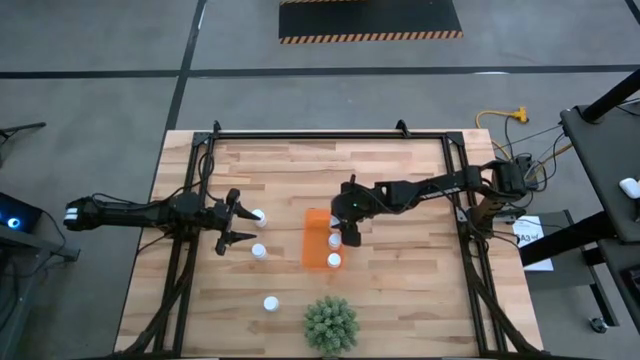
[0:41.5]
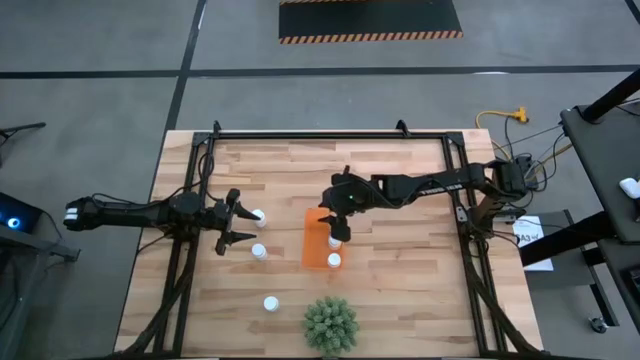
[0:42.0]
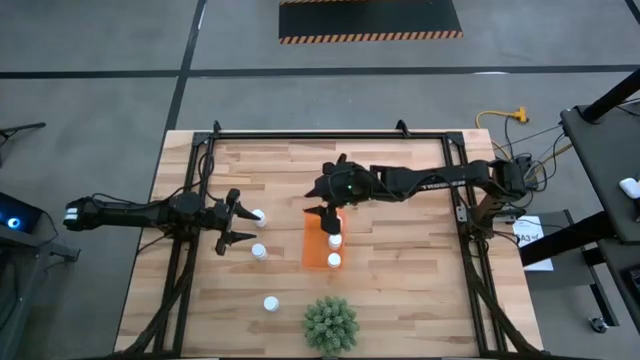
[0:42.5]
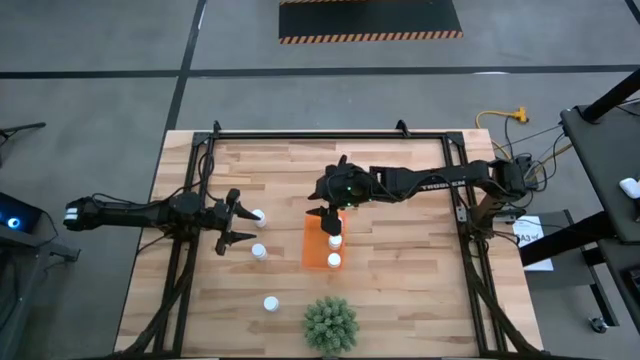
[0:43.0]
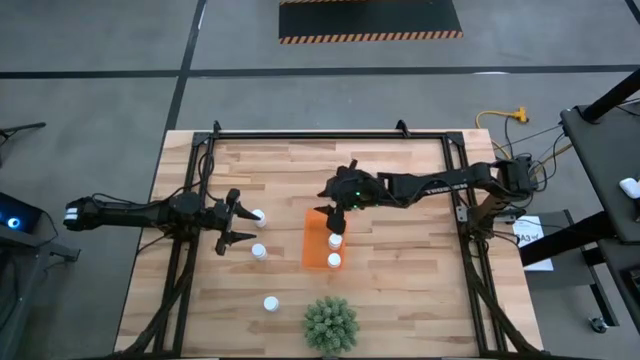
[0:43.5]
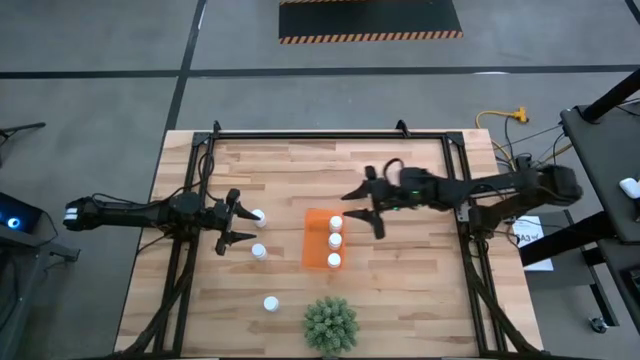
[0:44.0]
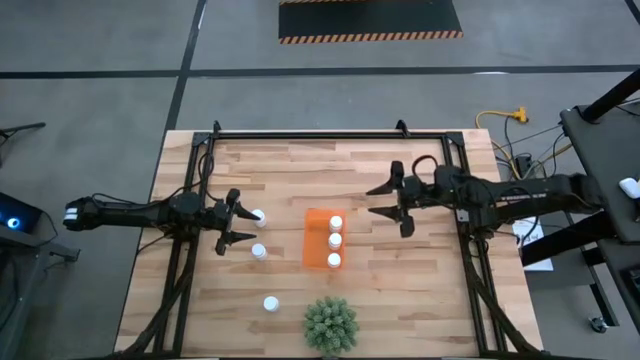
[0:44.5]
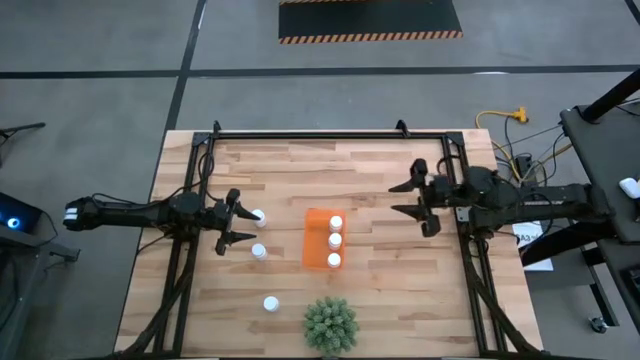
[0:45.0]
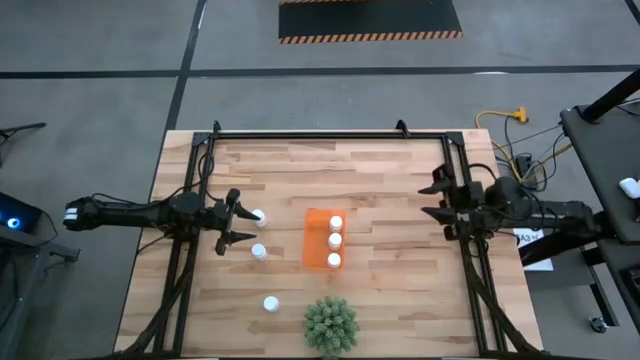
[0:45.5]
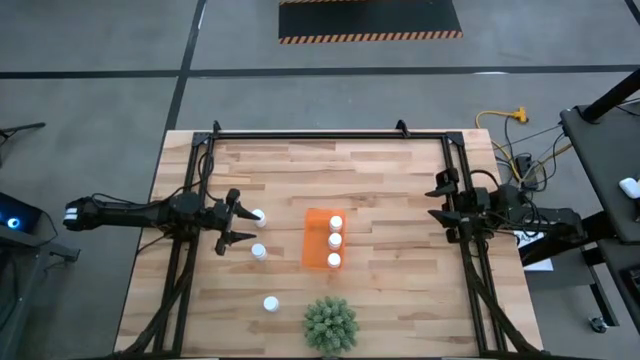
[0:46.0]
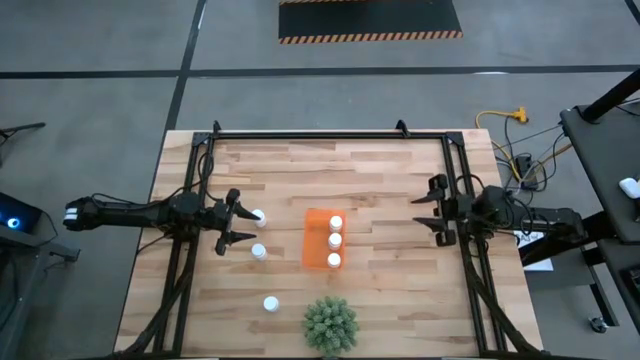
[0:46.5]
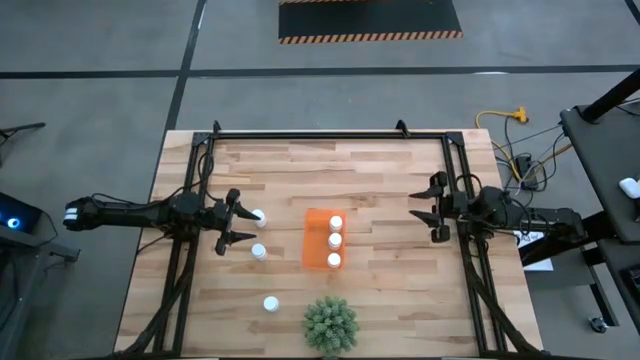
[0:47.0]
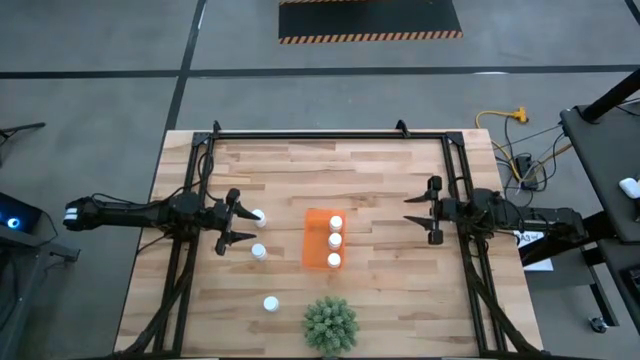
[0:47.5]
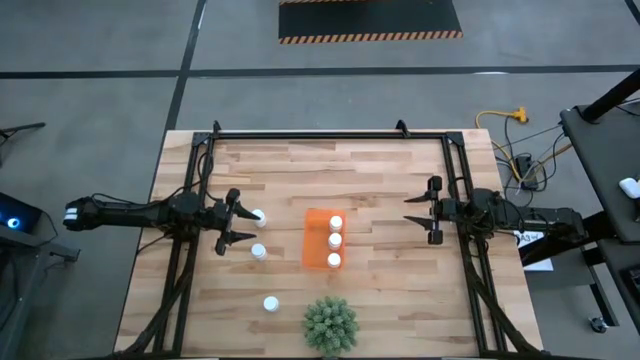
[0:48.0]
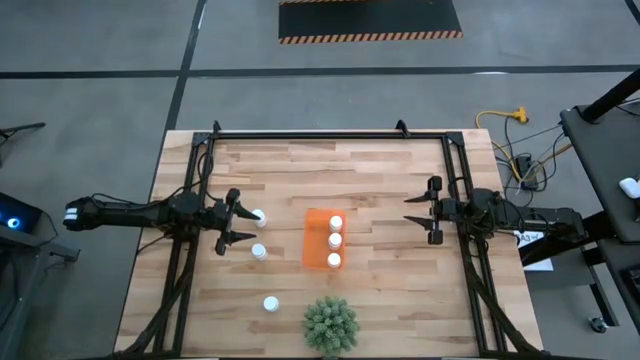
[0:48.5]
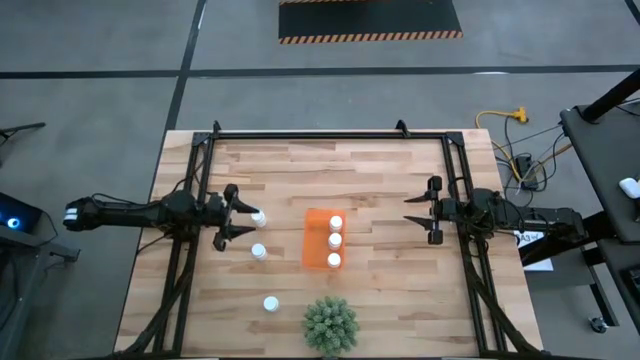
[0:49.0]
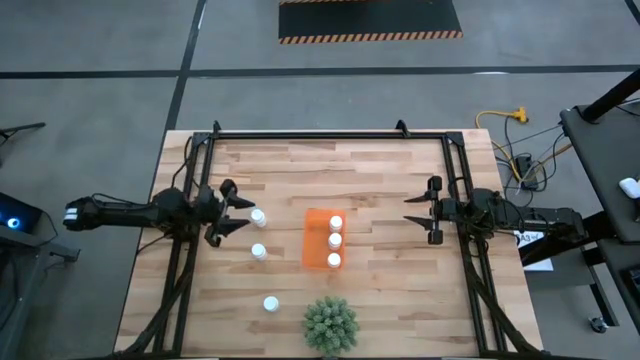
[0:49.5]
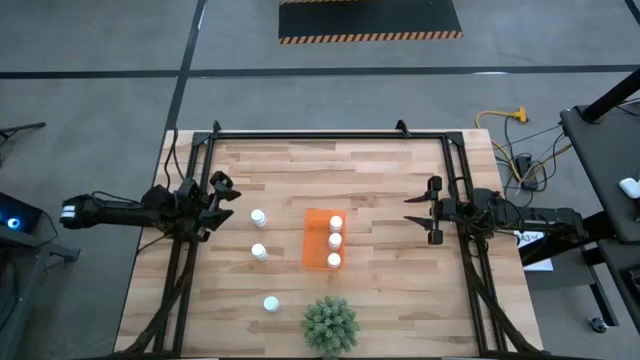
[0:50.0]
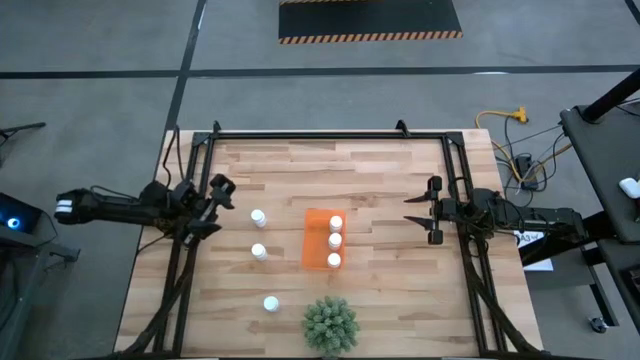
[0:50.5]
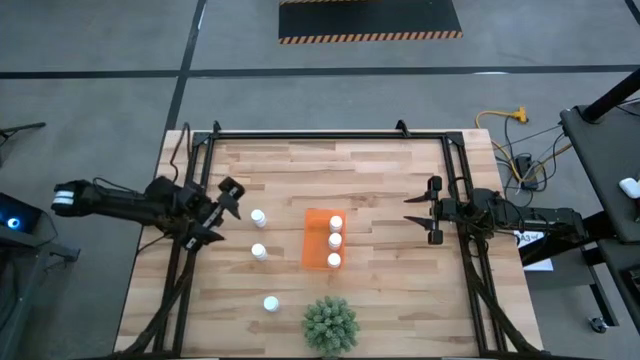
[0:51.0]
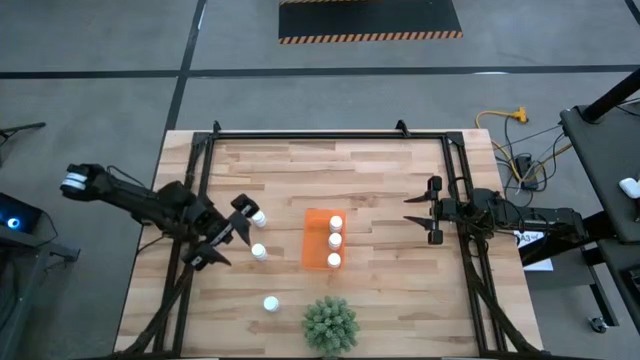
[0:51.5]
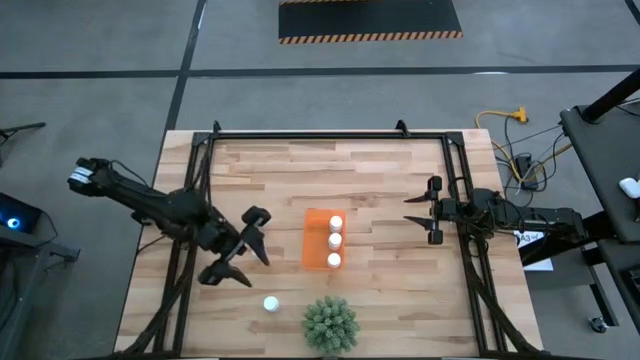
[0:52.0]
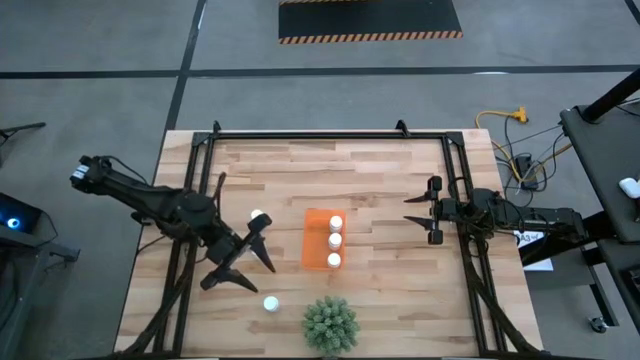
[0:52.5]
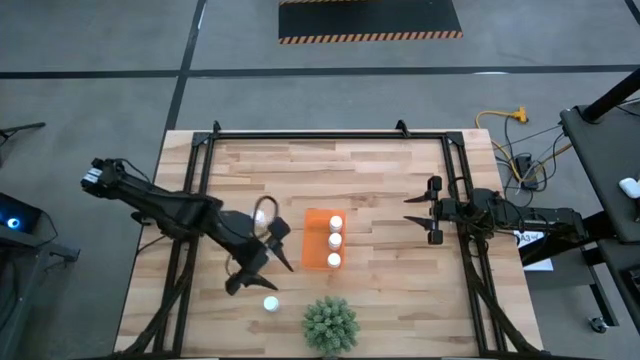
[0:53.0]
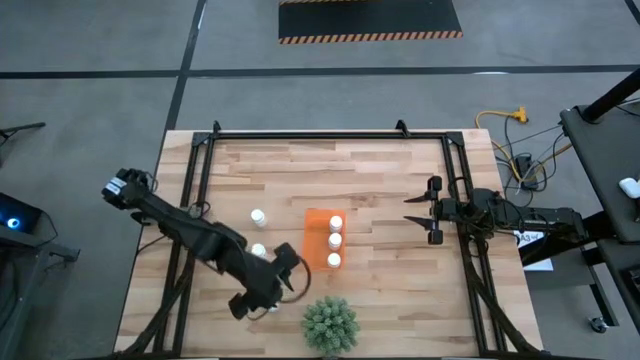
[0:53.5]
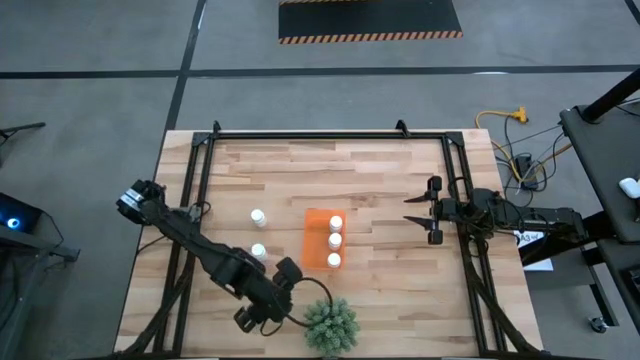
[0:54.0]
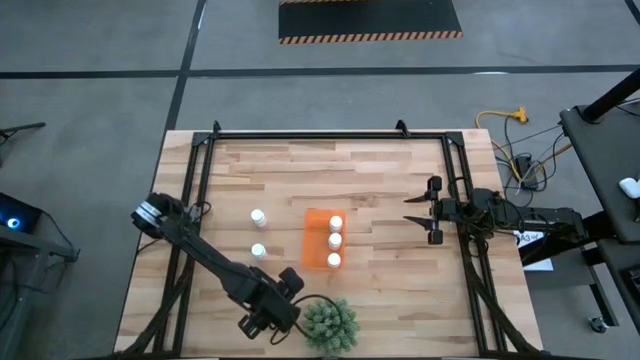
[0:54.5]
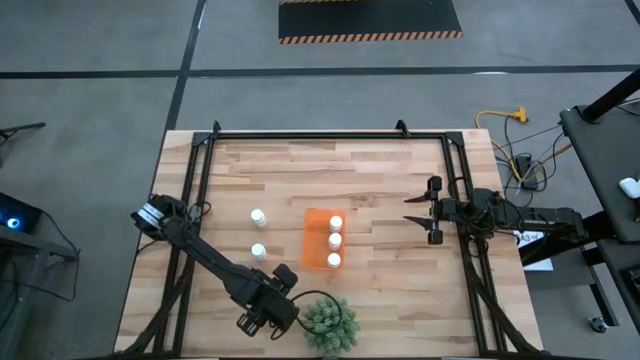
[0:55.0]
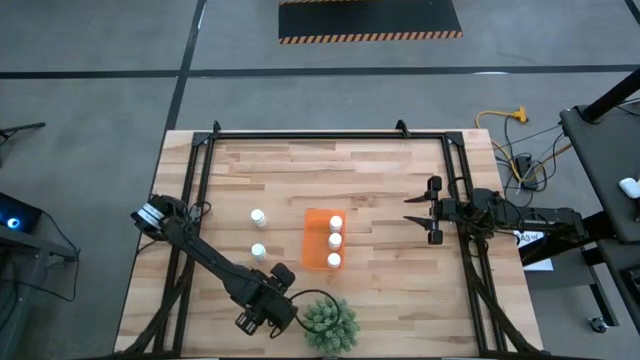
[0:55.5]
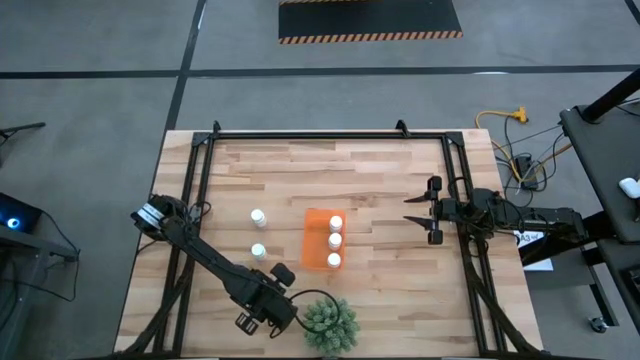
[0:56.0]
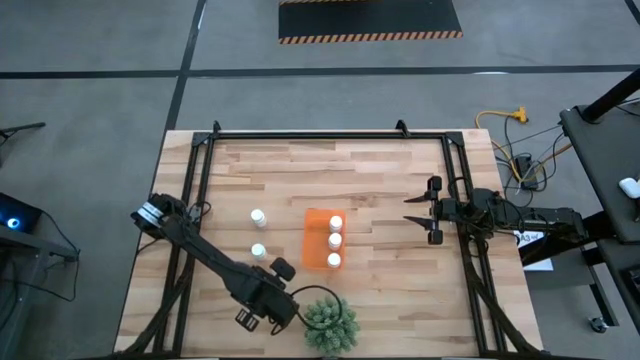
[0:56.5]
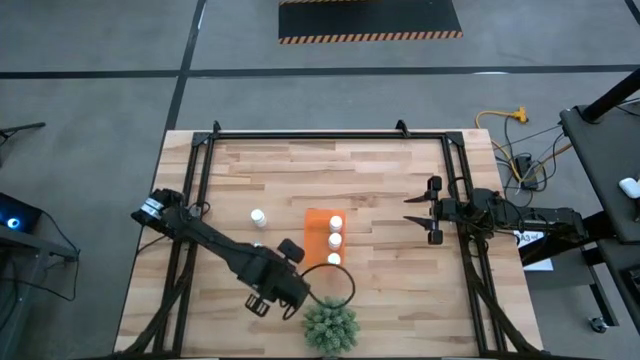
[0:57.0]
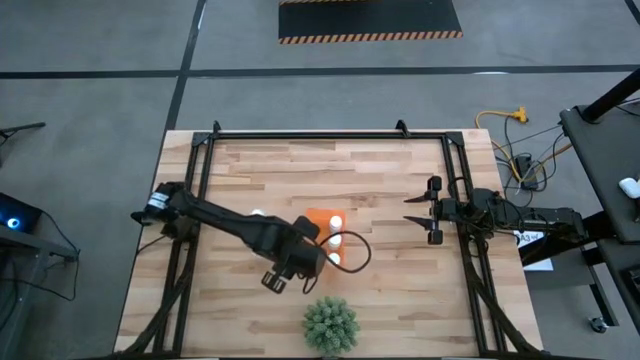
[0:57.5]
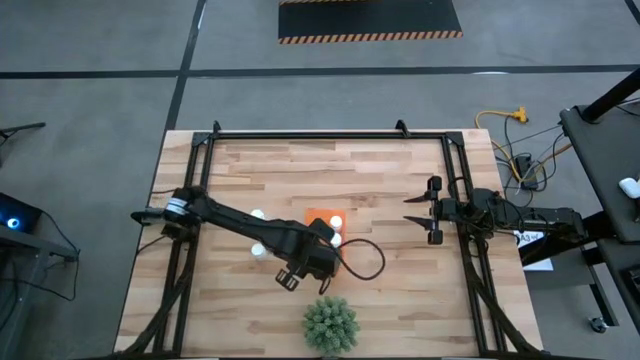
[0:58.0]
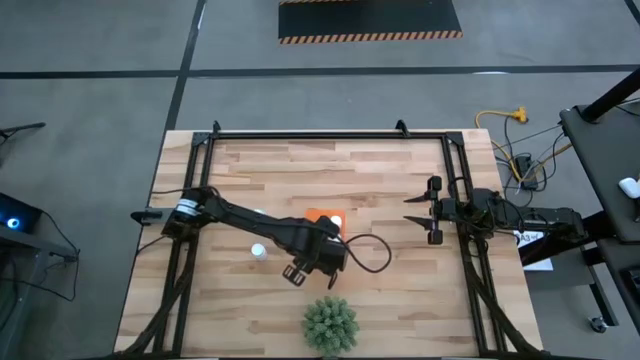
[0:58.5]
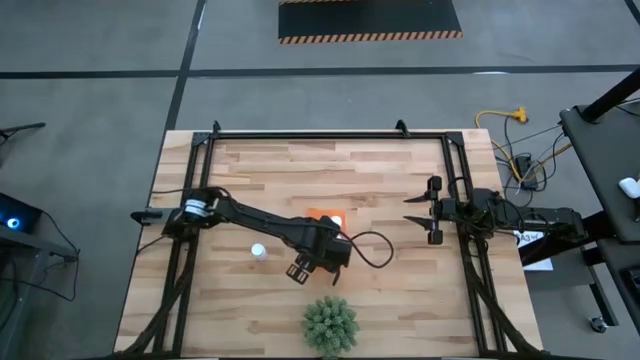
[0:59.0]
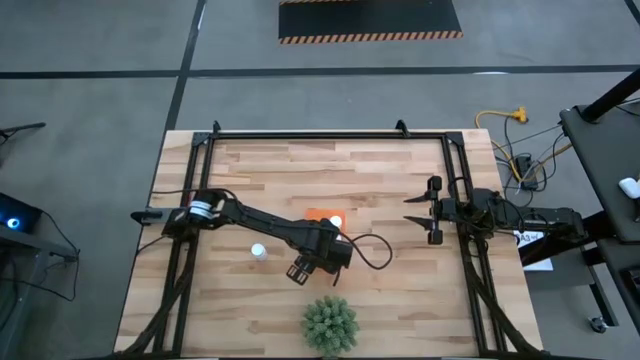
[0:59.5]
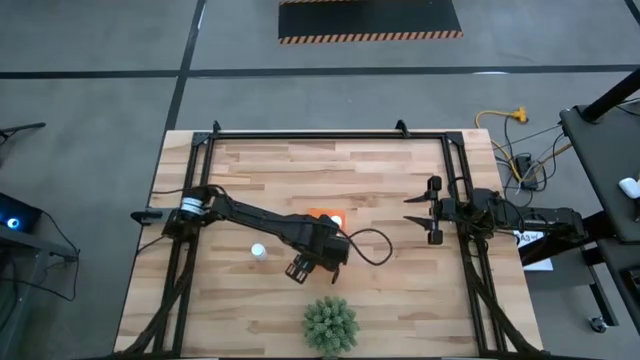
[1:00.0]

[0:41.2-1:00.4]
Task: Pick and place pill bottles into a basket
Put the white pill bottle into the orange bin

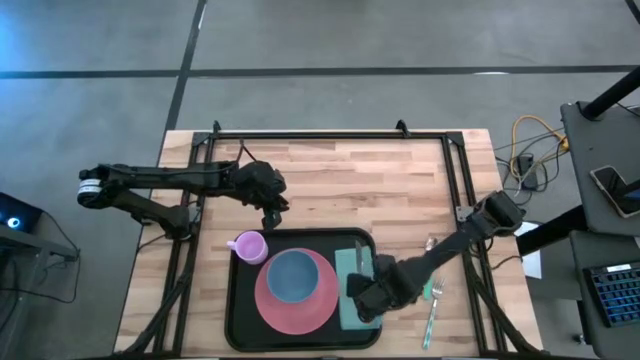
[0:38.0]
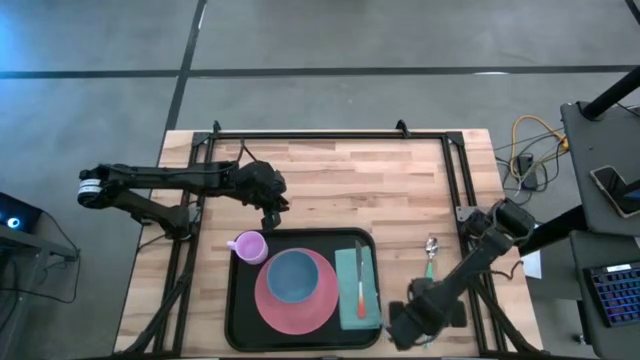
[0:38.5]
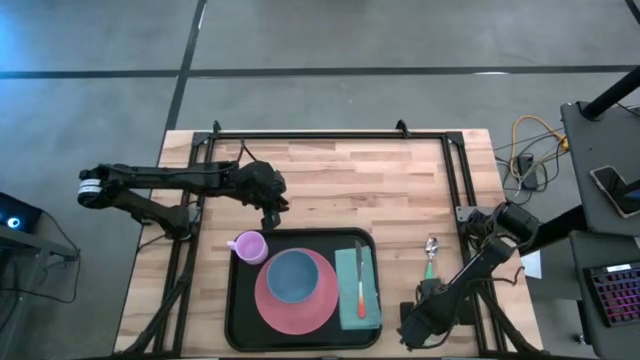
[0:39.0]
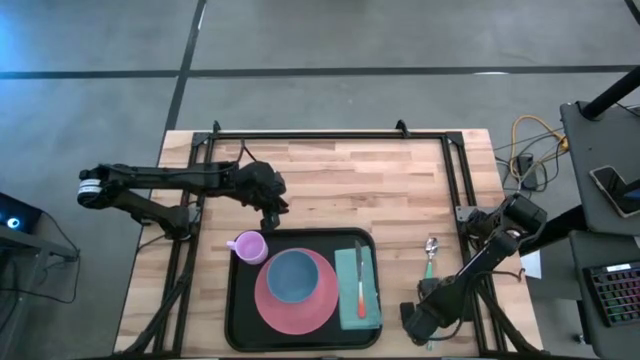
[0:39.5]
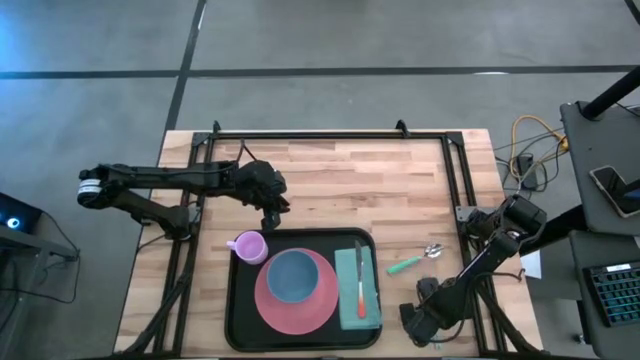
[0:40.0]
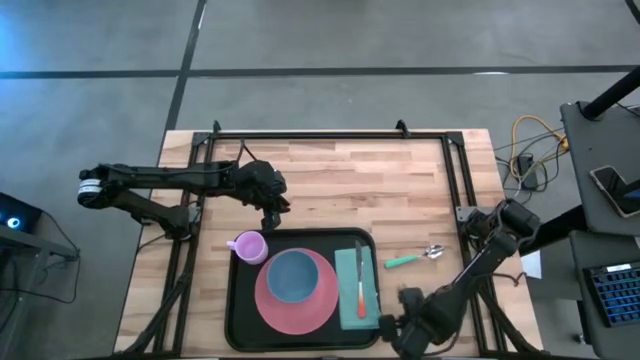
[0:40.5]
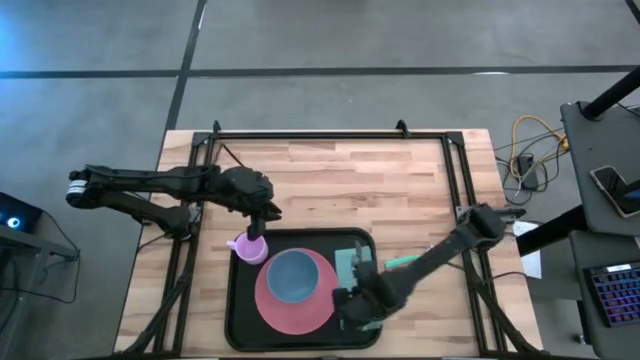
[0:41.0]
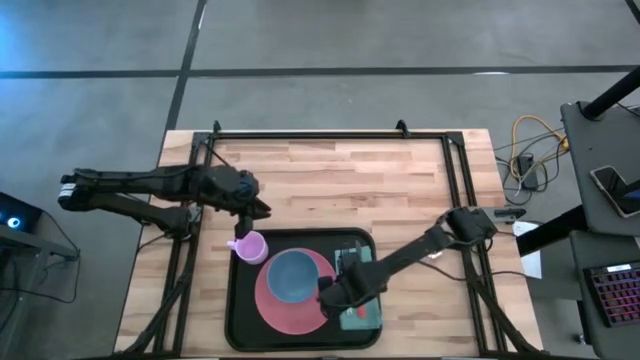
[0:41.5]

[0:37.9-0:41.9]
Task: Set up tray
Put the green fork on the blue napkin
